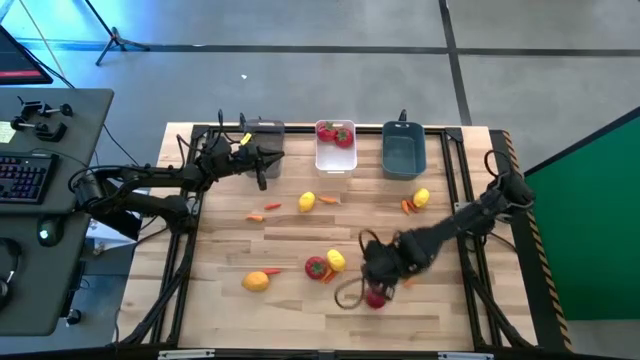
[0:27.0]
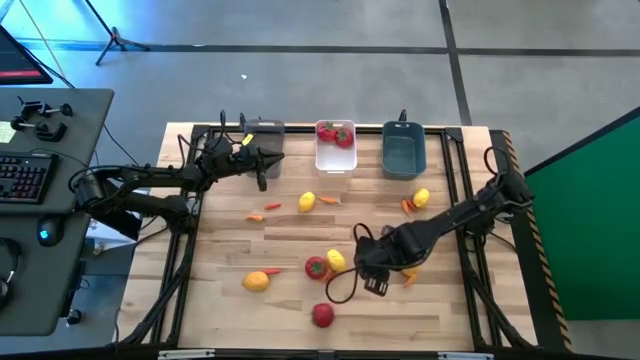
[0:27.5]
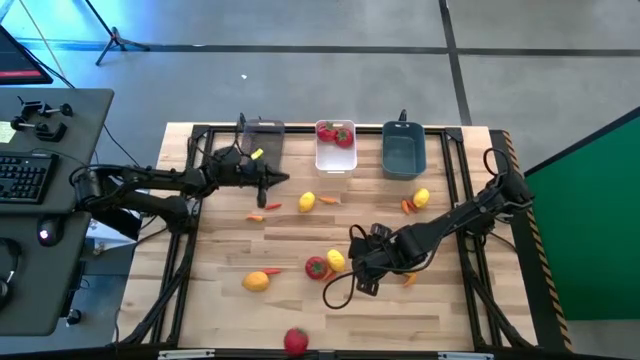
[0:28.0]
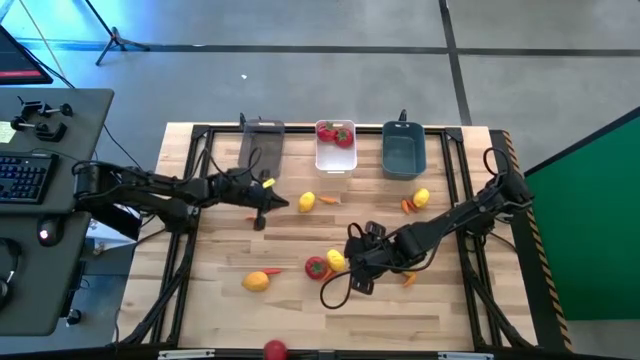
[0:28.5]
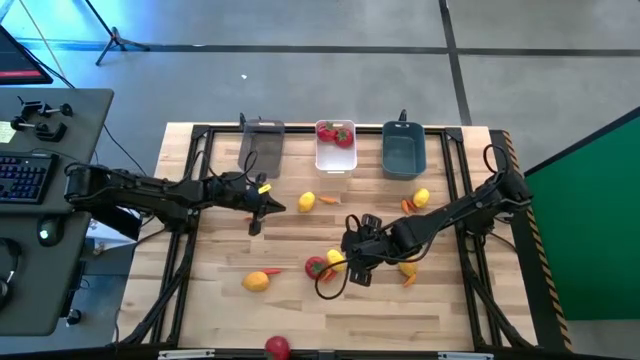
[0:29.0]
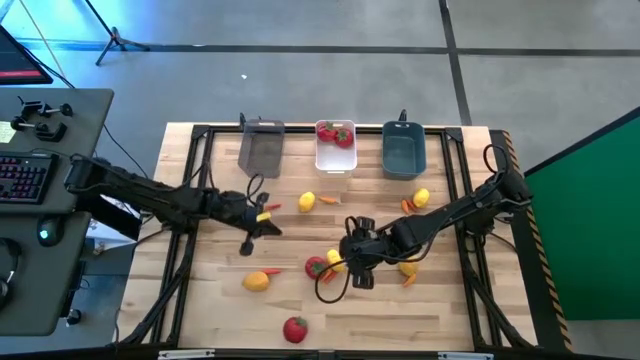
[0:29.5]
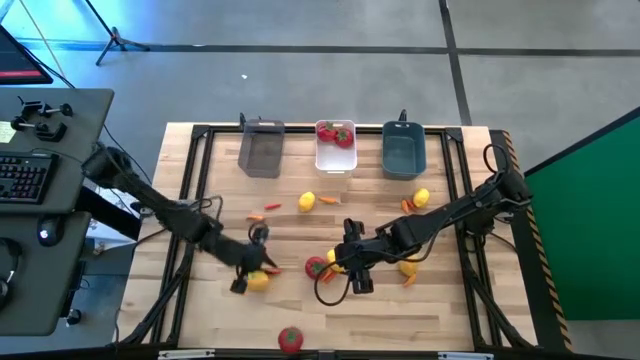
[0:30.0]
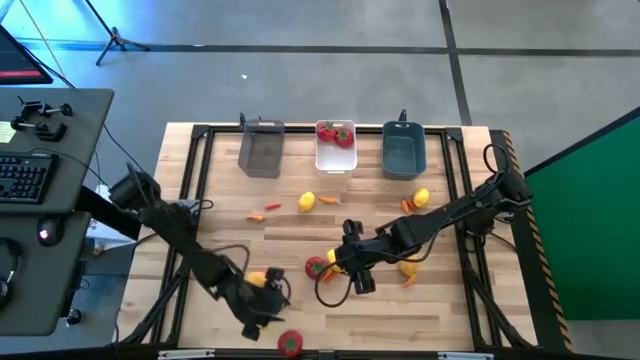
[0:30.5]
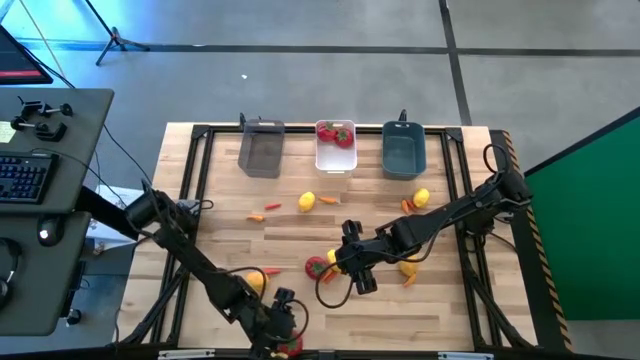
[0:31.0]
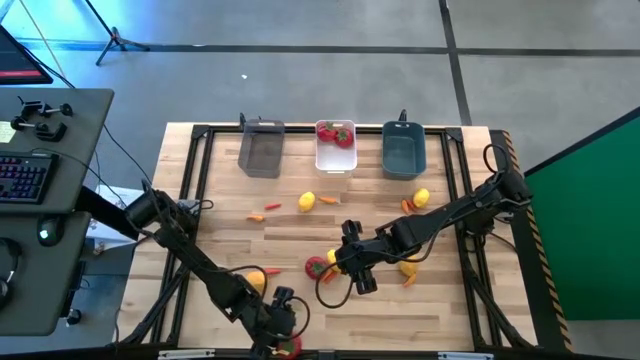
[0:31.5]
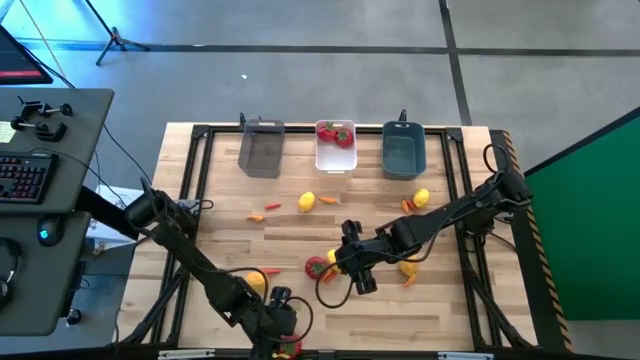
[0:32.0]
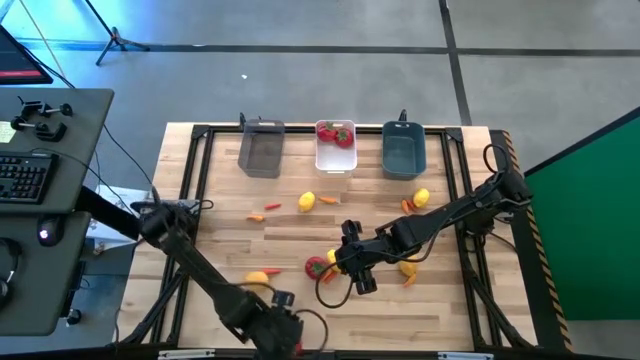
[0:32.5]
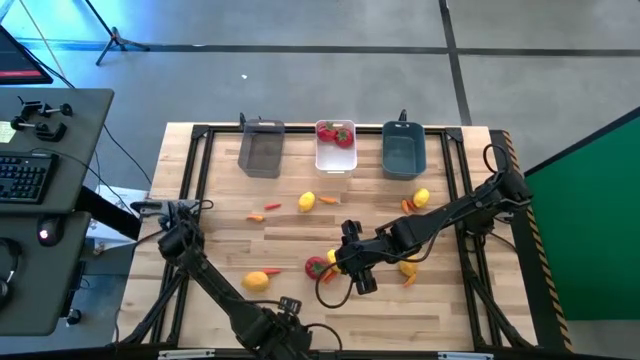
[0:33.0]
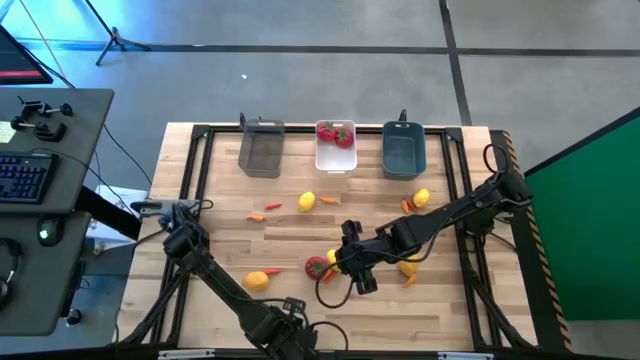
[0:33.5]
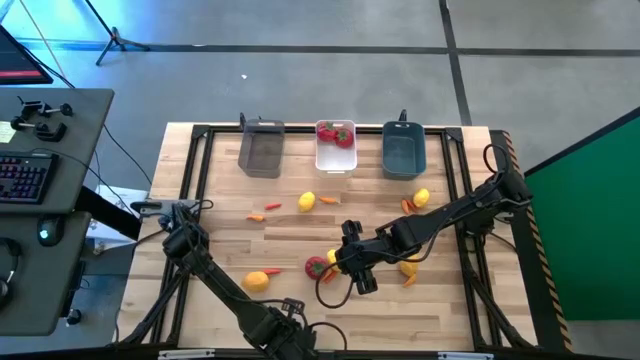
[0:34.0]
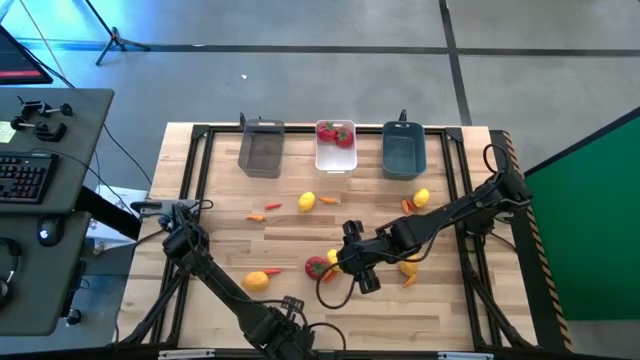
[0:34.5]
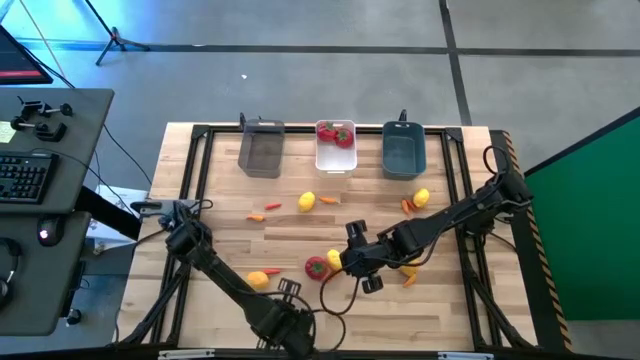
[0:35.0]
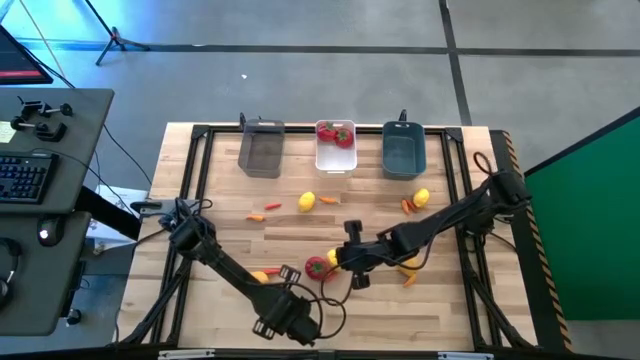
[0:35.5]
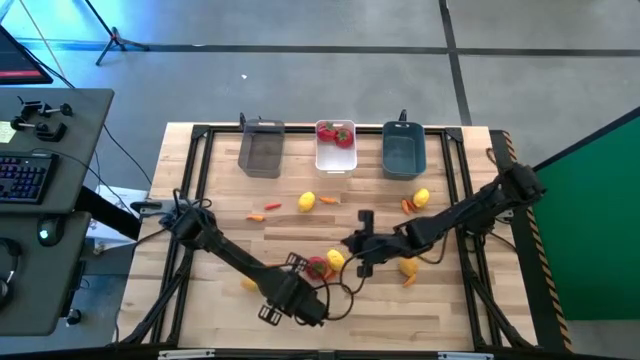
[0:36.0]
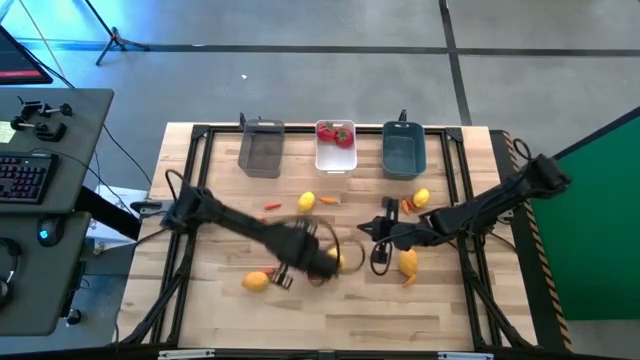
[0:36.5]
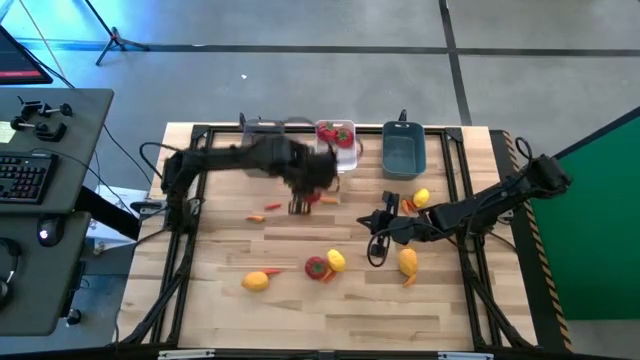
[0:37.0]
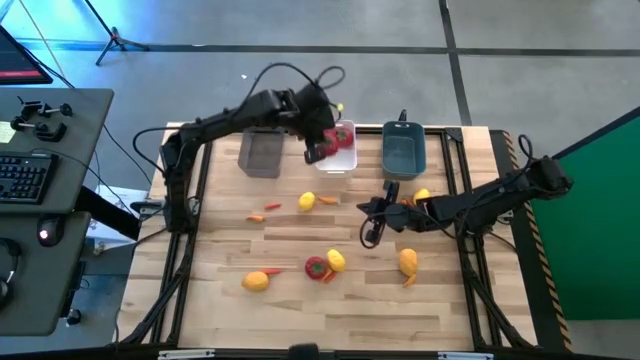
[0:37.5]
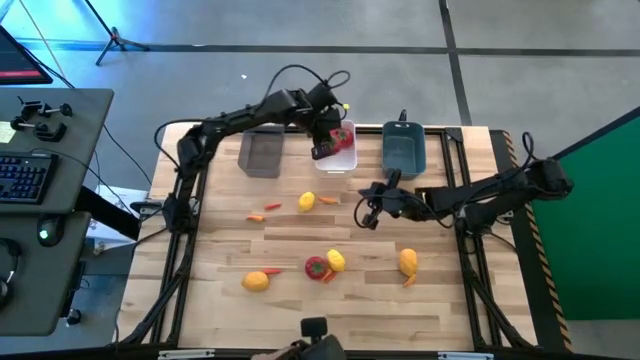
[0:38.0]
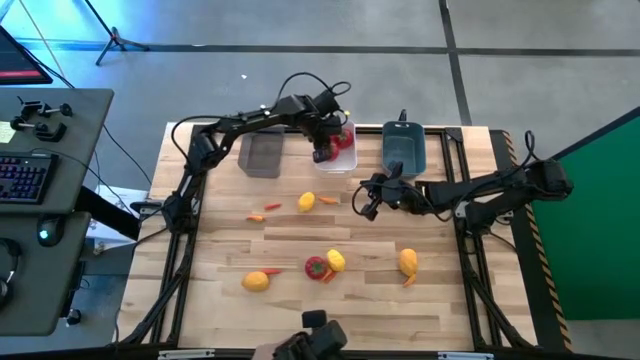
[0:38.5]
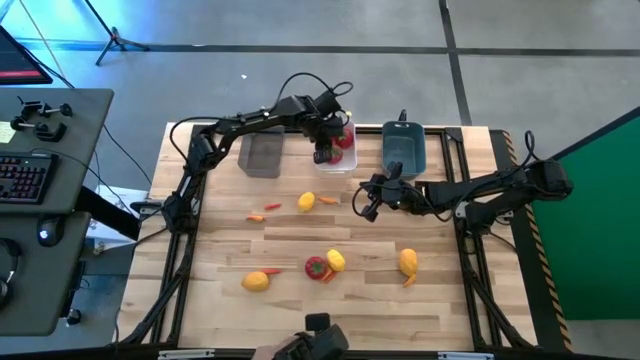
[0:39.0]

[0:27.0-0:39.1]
Task: Sort produce into baskets
Put the red tomato into the white bin

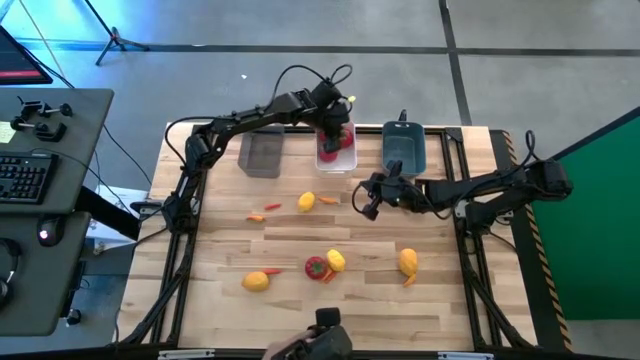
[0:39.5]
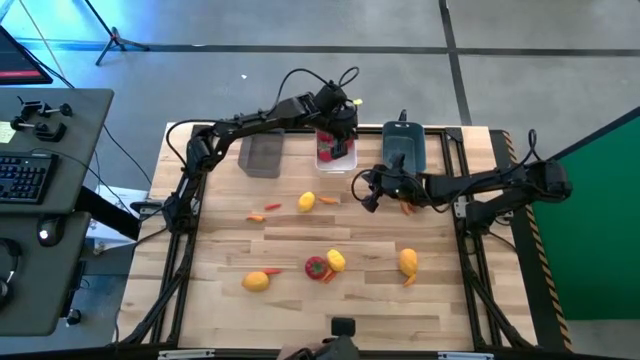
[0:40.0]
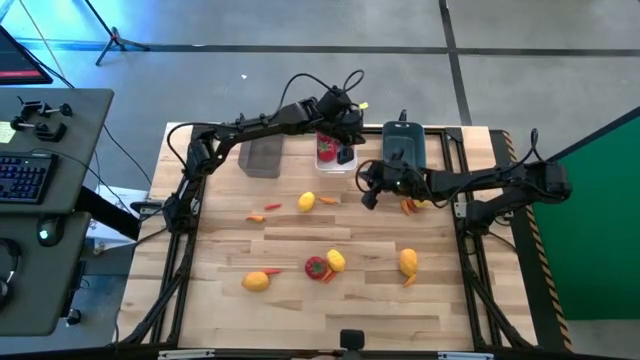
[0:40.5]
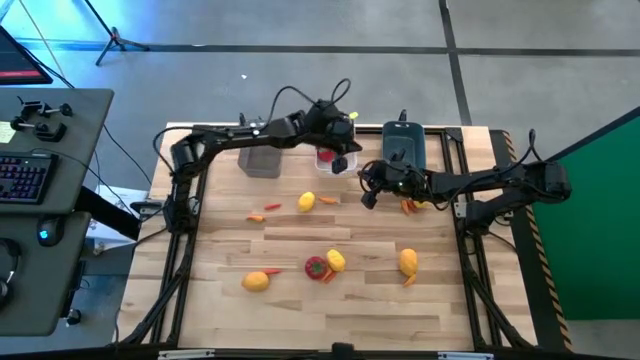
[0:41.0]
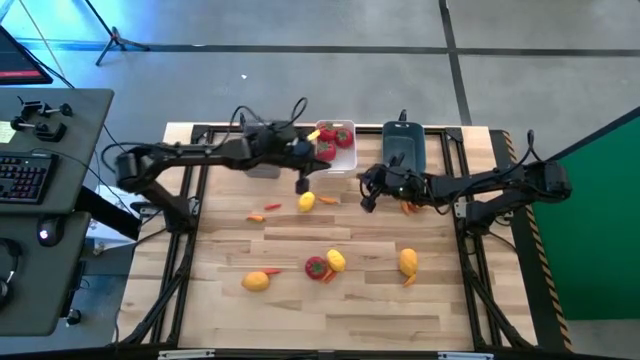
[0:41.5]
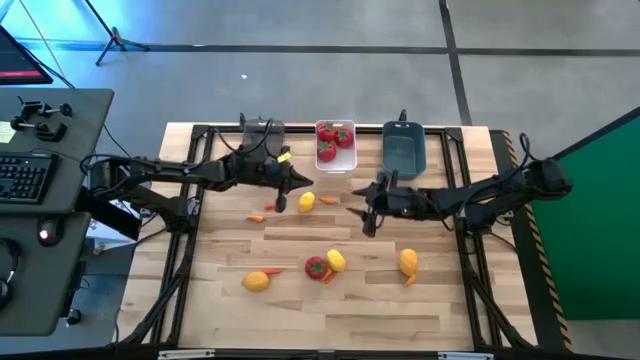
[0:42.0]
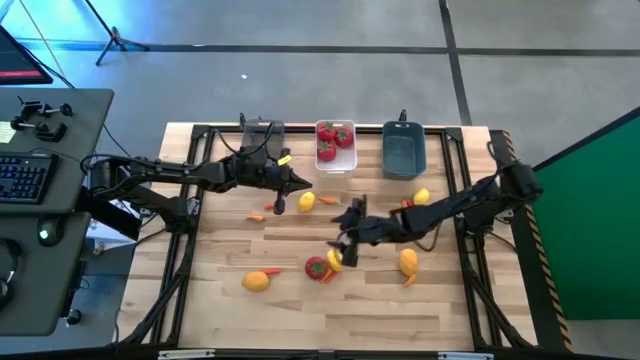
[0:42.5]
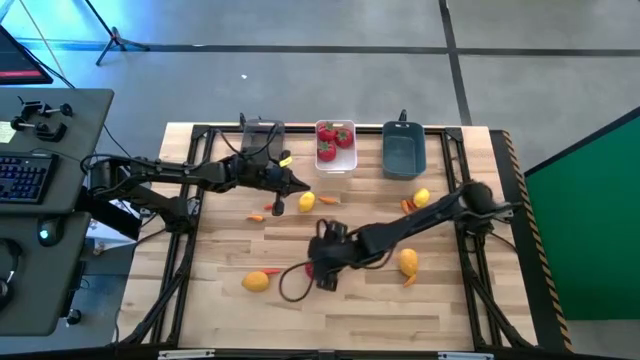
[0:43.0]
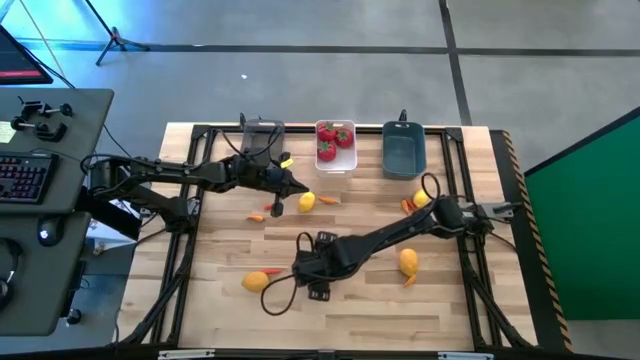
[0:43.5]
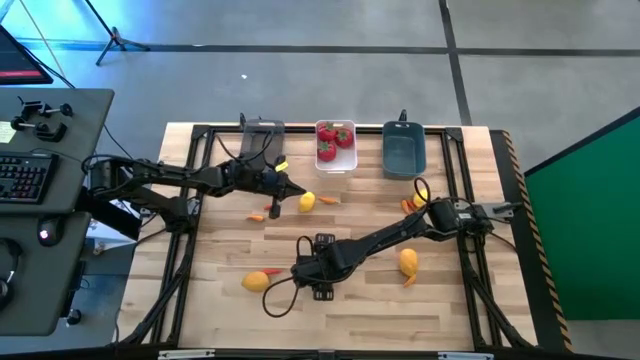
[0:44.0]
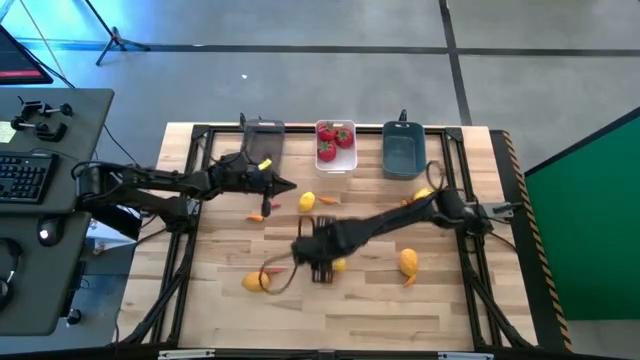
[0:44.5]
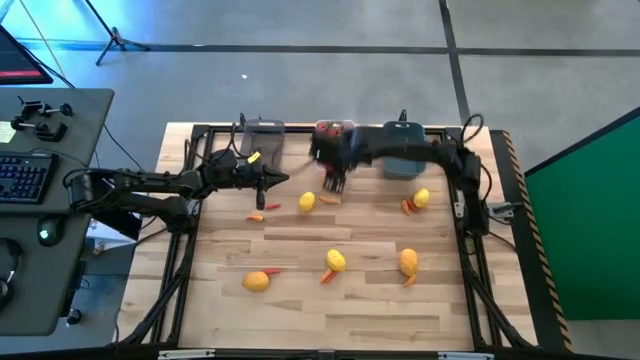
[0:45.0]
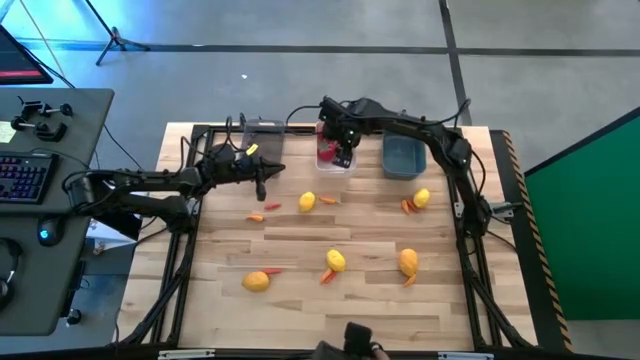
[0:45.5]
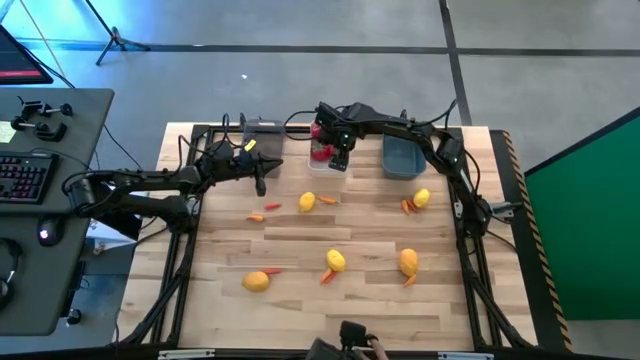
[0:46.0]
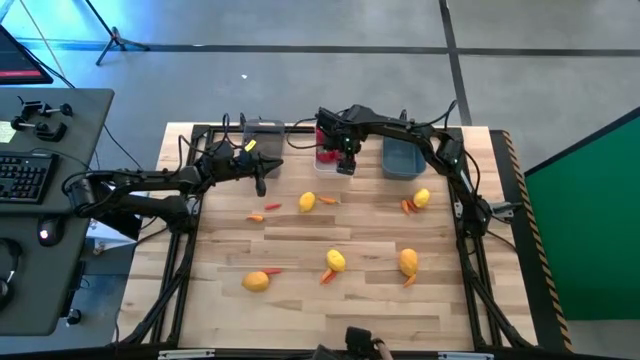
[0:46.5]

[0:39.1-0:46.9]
Put the red tomato into the white bin

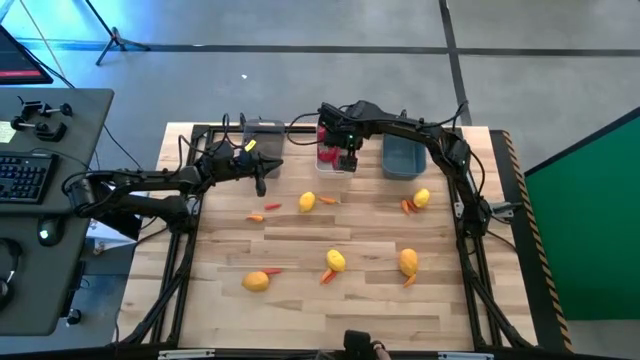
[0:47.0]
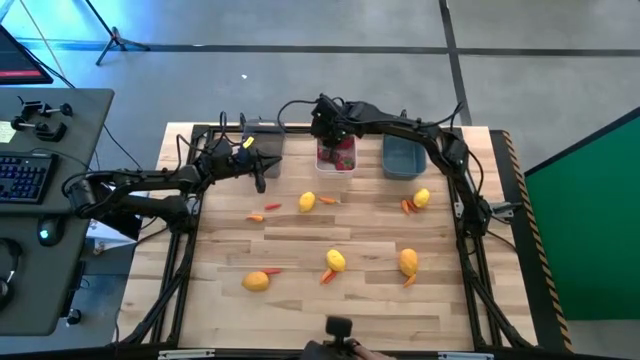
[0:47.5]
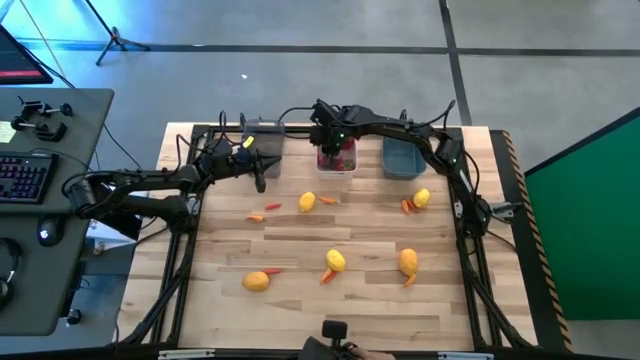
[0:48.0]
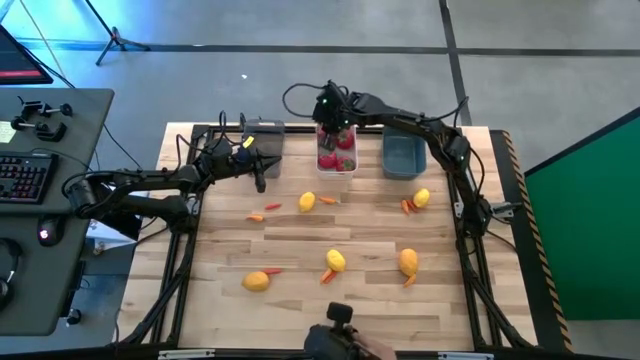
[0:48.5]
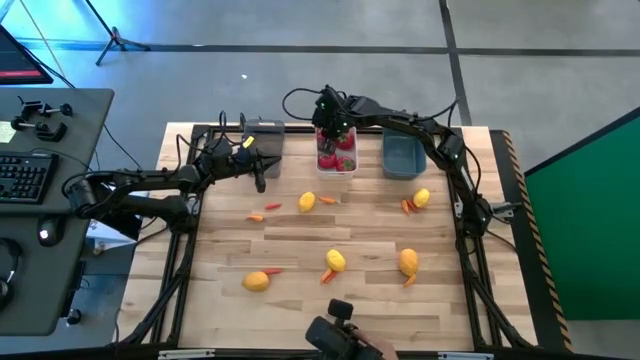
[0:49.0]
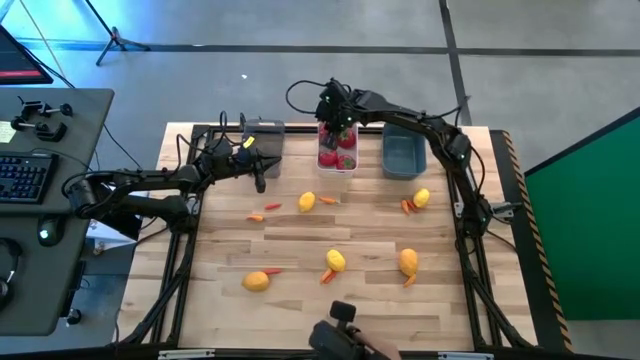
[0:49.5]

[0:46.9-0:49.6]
Adjust the red tomatoes in the white bin
